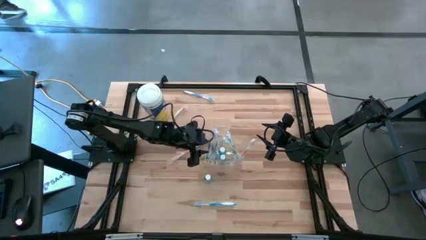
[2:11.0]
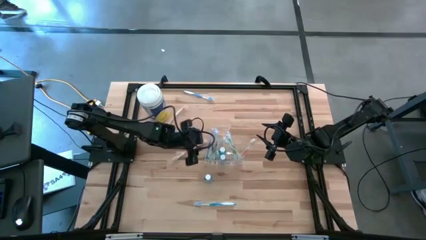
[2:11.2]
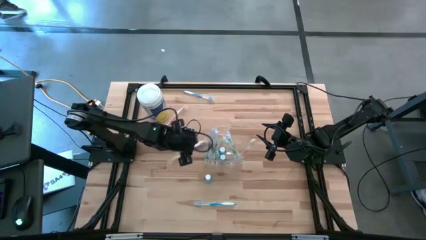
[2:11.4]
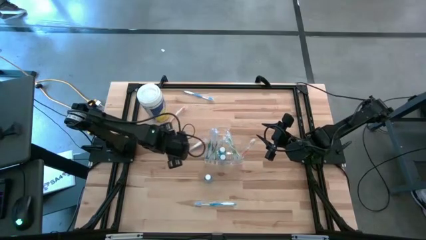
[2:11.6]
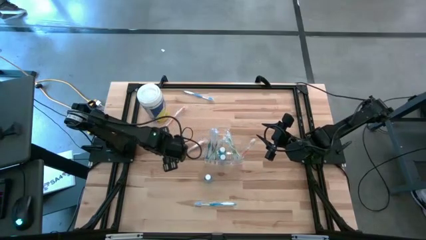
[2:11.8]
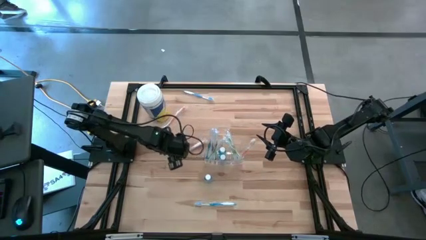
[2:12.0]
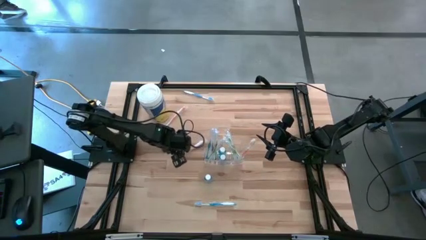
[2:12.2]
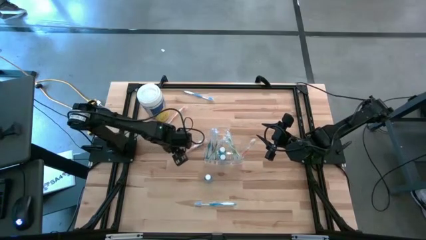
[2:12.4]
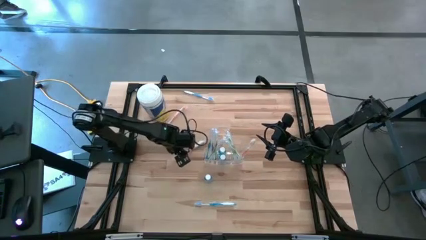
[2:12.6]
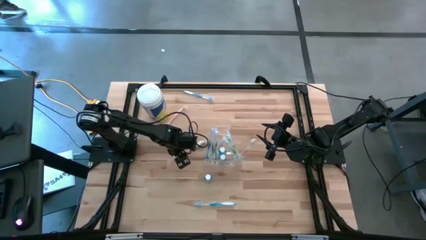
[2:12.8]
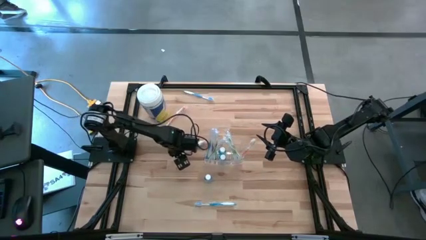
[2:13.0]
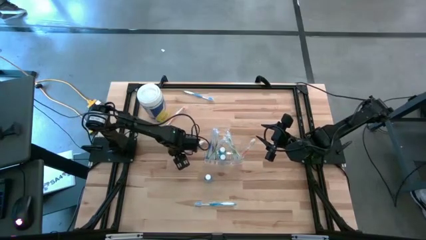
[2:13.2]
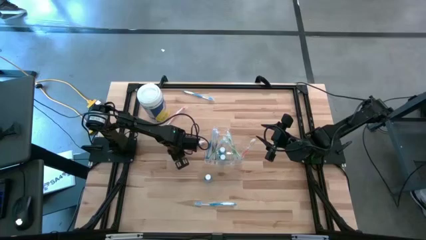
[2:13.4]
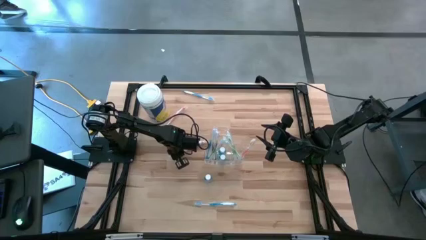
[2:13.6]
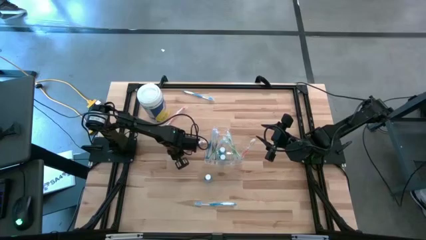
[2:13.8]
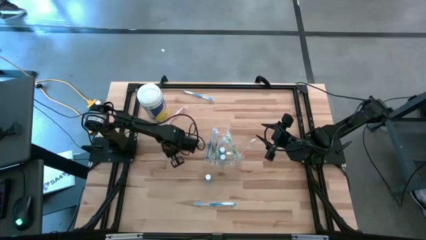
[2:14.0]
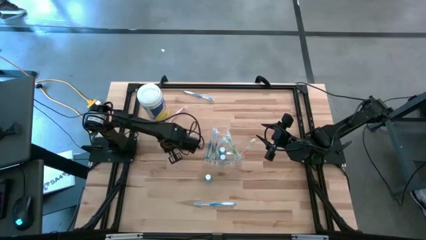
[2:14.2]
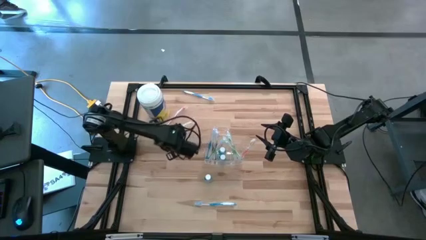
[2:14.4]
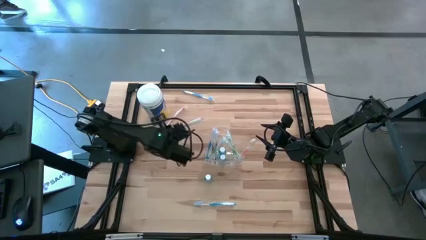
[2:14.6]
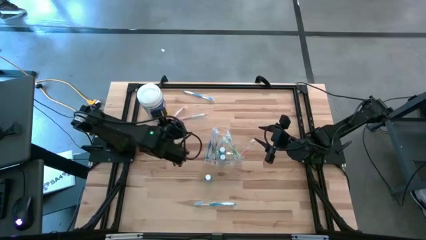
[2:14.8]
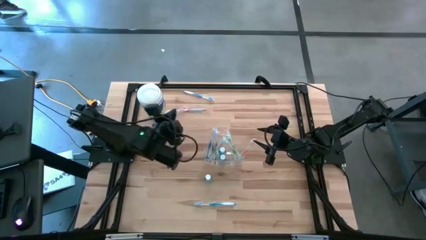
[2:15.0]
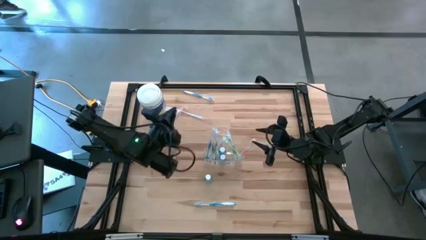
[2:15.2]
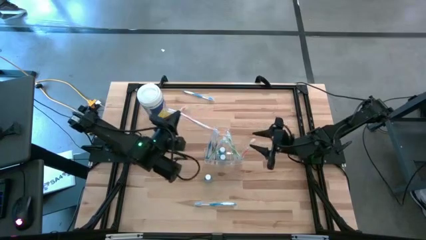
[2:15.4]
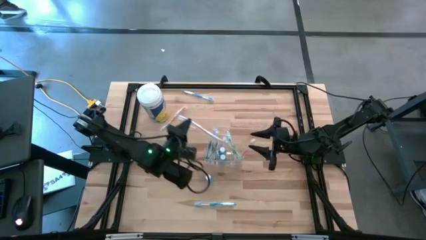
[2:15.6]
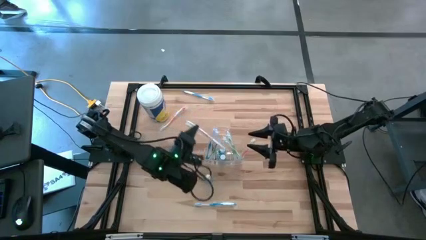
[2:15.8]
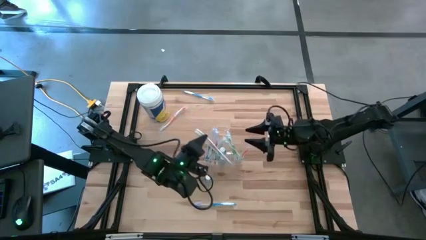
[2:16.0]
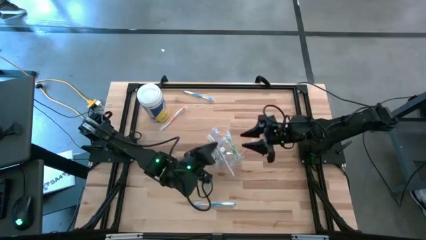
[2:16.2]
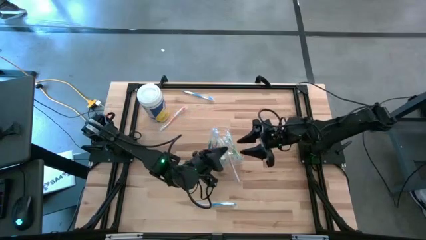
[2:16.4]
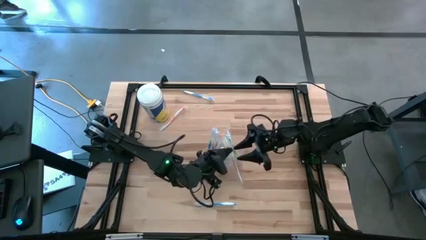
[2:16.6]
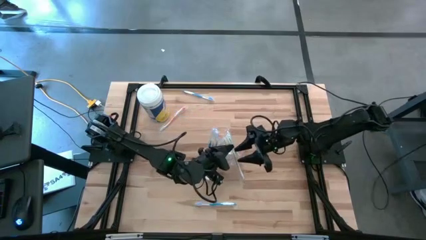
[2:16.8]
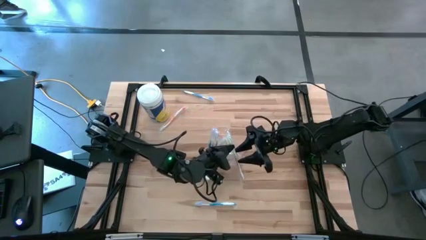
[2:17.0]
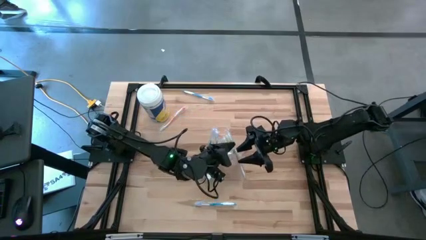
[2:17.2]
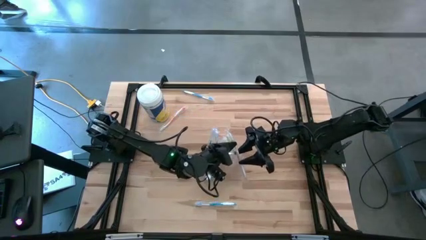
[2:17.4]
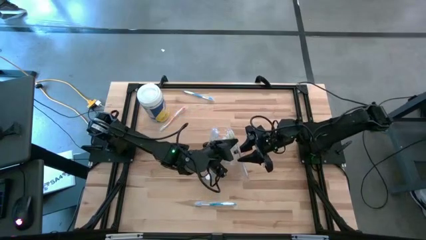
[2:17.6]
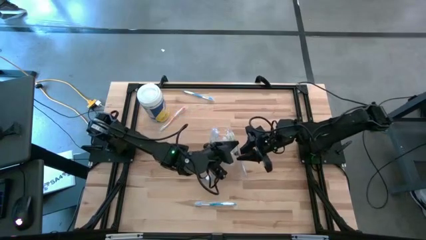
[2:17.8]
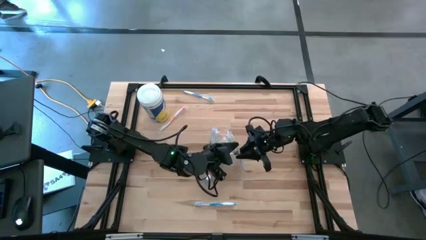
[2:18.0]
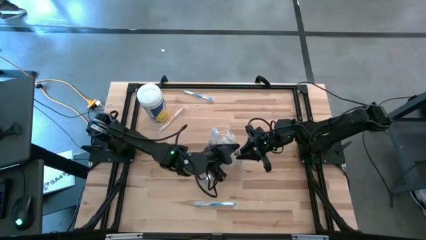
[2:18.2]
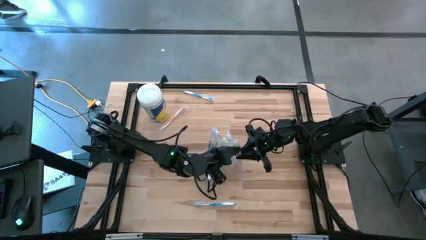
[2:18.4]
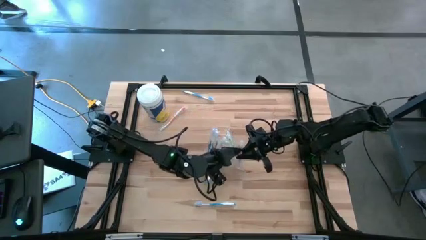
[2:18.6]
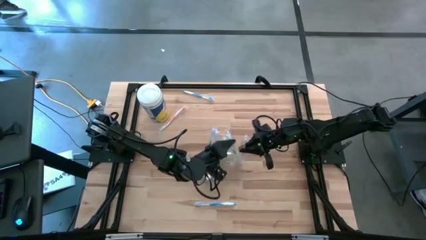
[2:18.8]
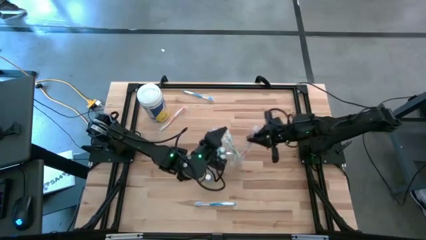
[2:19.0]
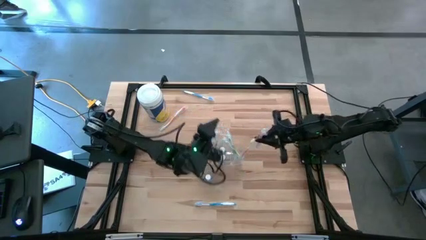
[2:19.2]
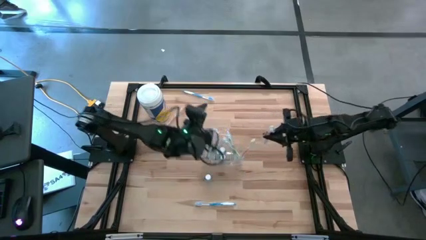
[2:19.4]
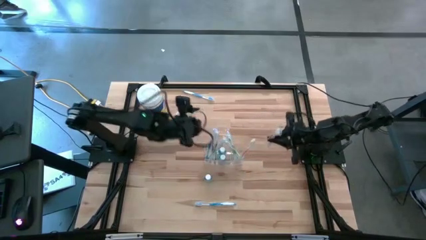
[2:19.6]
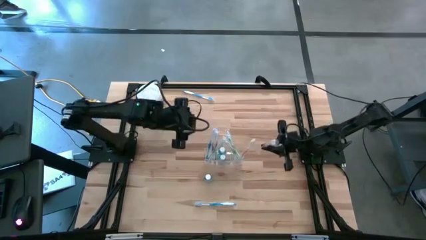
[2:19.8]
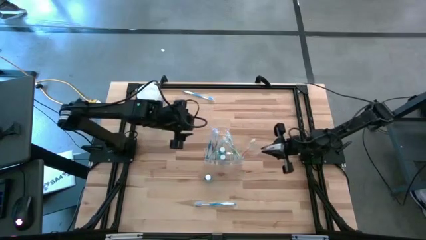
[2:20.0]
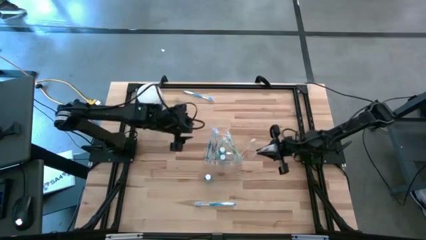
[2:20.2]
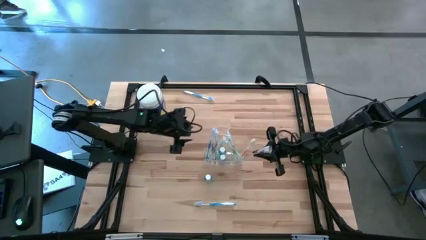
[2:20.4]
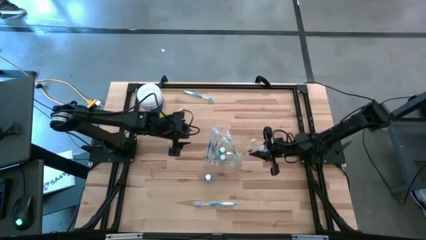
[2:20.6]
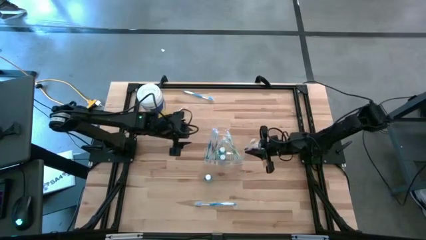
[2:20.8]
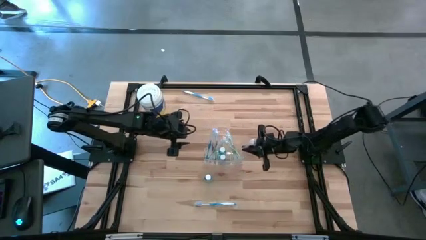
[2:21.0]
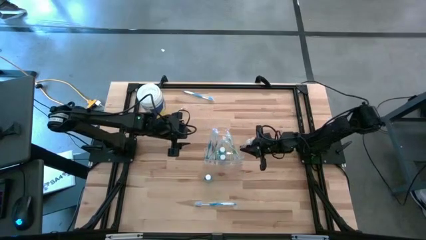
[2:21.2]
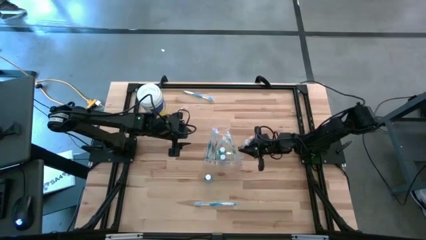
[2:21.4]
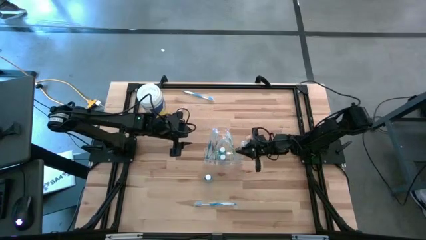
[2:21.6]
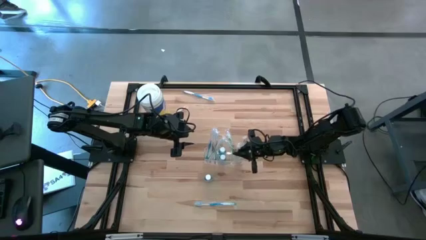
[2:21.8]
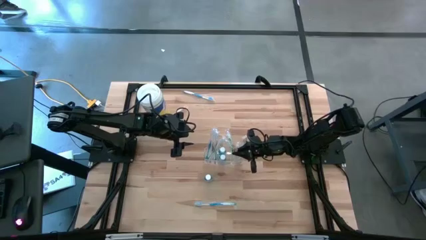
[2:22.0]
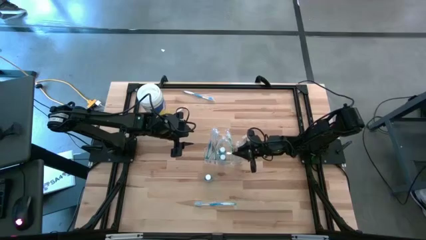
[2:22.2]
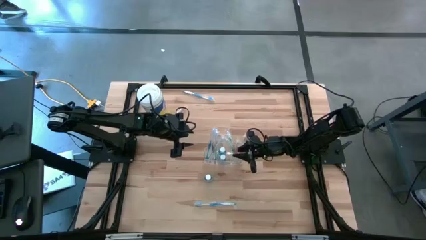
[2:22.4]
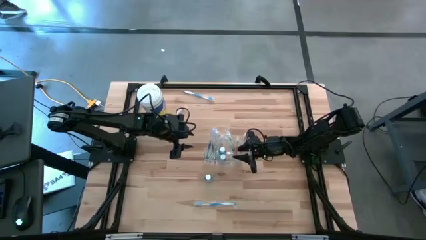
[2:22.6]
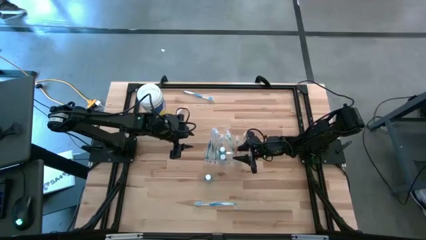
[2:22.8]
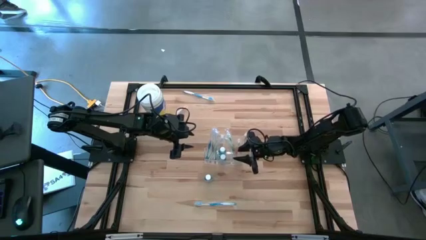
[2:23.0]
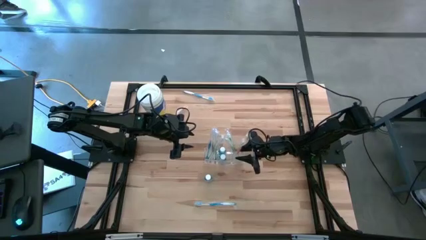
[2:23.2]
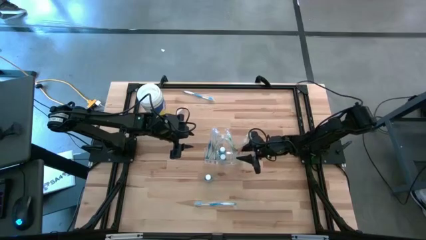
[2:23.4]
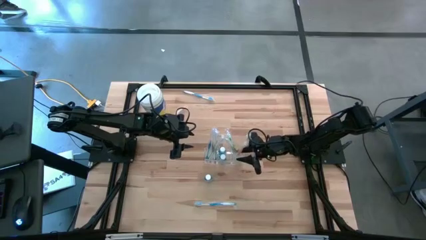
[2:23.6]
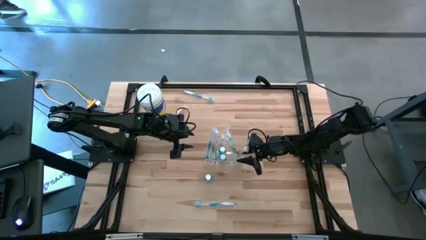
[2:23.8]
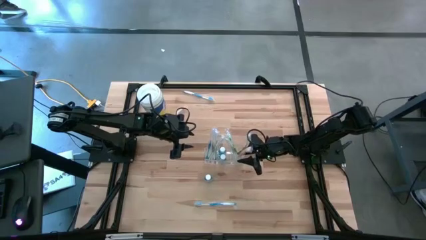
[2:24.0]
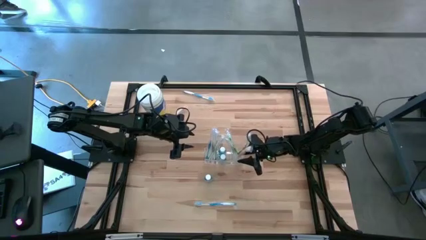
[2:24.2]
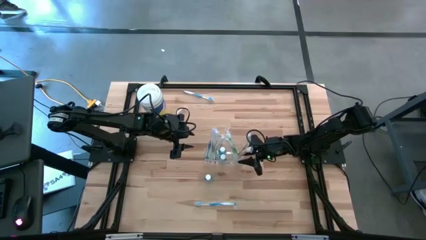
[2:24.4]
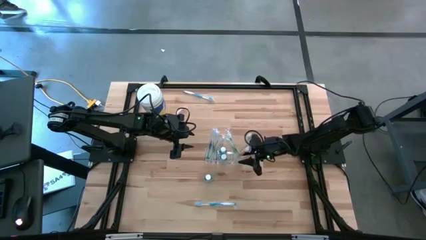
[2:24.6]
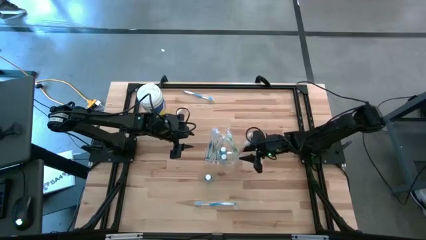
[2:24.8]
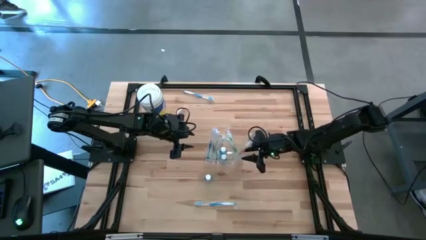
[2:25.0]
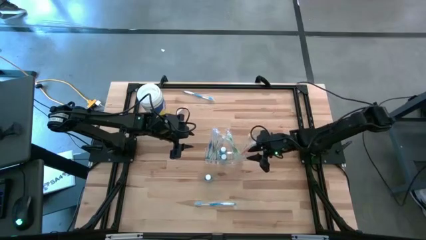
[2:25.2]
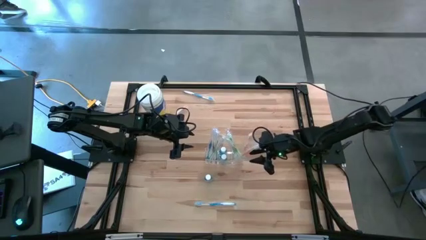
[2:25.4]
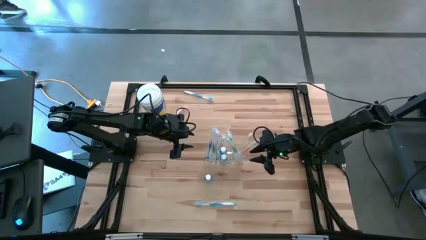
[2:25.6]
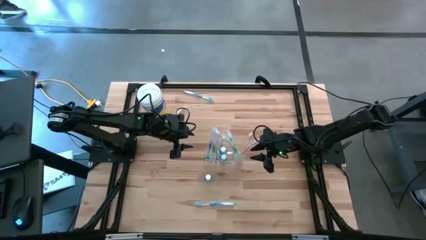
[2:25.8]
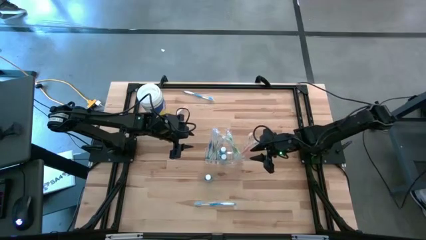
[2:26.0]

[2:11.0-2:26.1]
Task: Pick & Place toothbrushing station
Put the bottom orange toothbrush into the transparent organizer

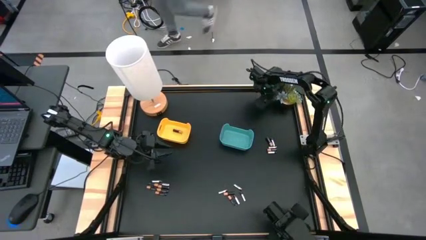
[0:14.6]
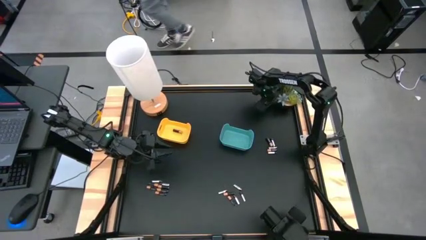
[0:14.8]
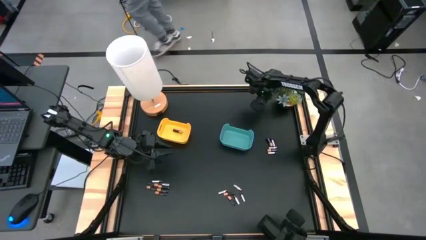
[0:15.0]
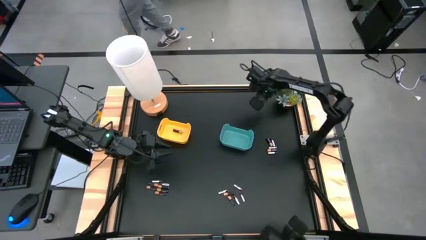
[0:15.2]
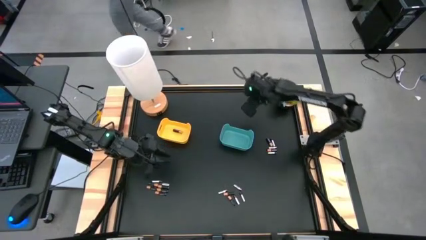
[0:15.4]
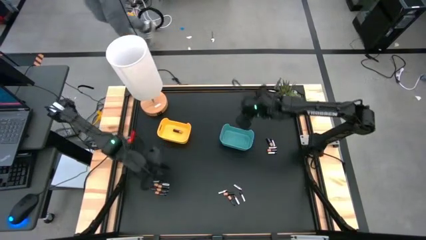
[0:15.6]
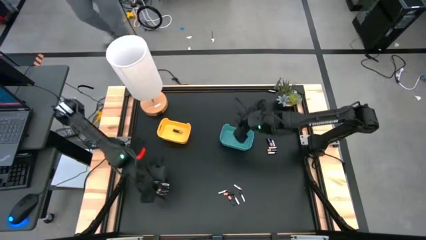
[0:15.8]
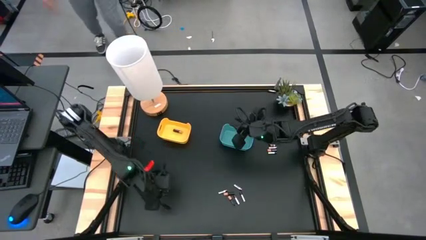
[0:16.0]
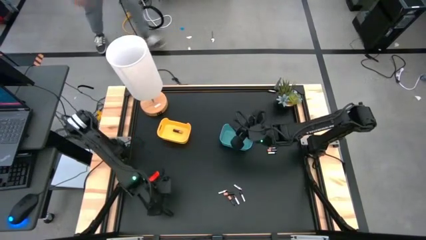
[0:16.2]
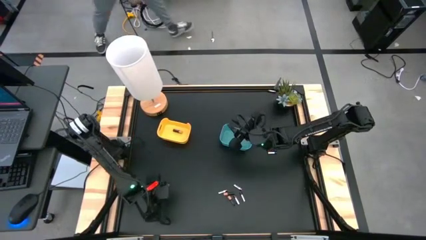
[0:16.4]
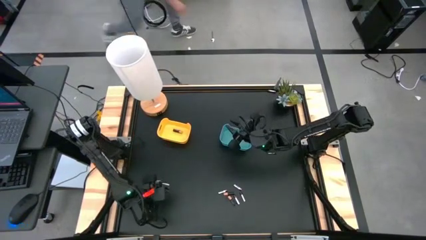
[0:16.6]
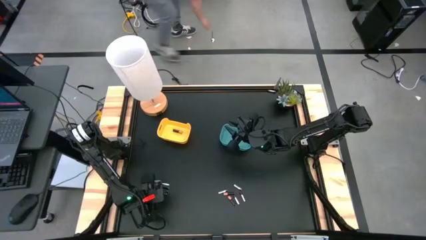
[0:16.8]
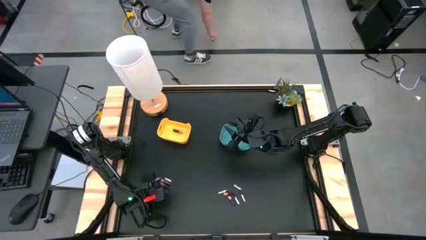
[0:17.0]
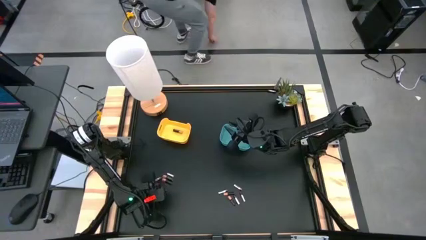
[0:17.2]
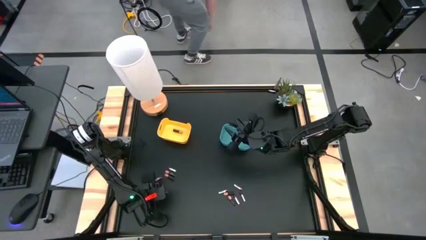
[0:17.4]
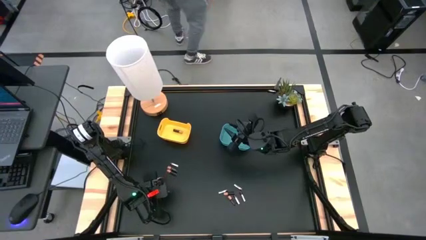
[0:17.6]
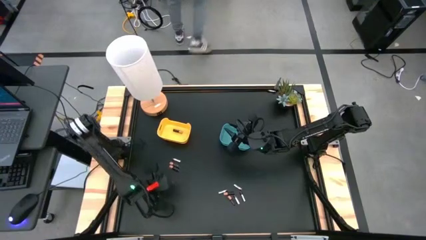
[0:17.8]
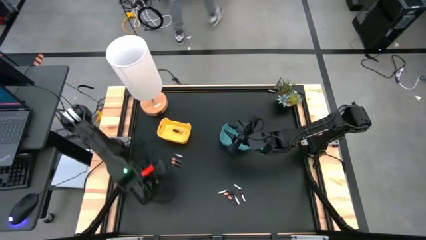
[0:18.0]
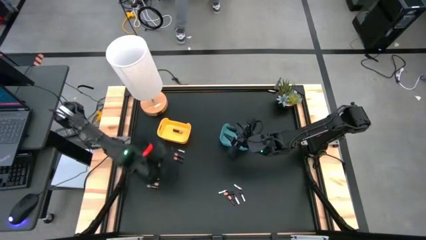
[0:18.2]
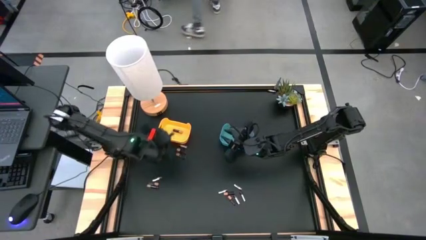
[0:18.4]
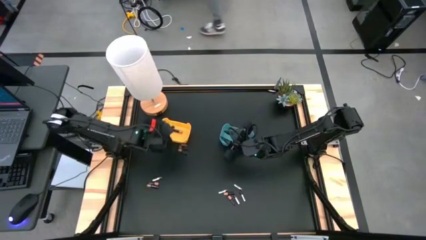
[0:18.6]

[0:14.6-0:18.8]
Task: Sort batteries
Put the black battery into the yellow bin
